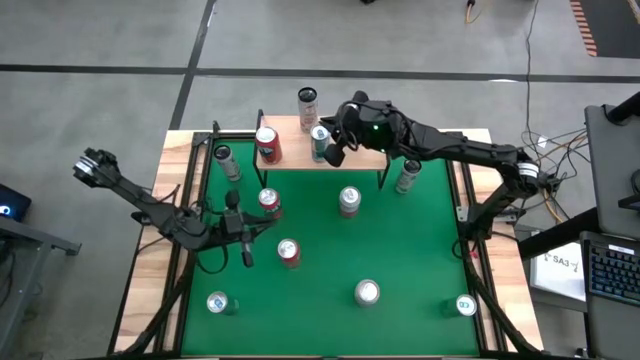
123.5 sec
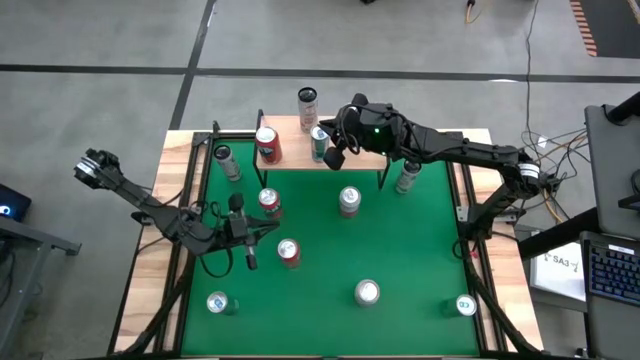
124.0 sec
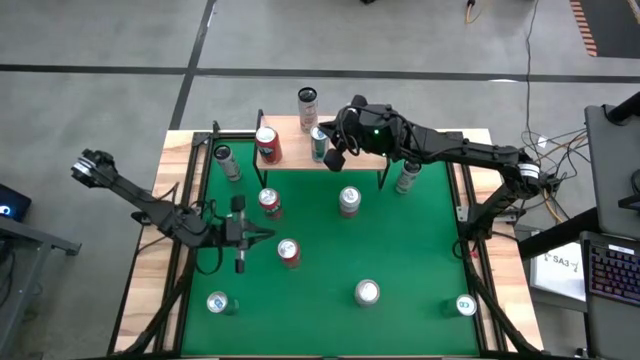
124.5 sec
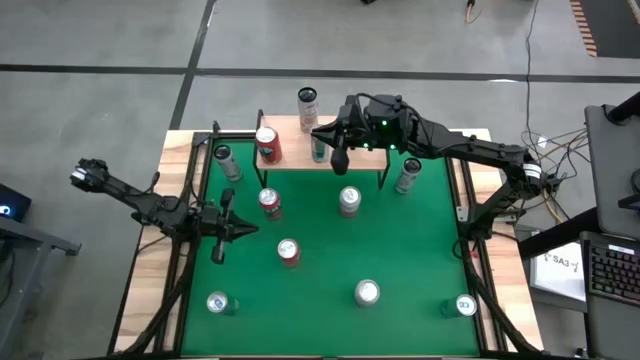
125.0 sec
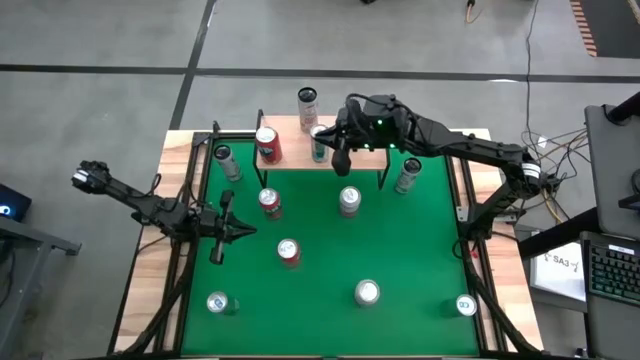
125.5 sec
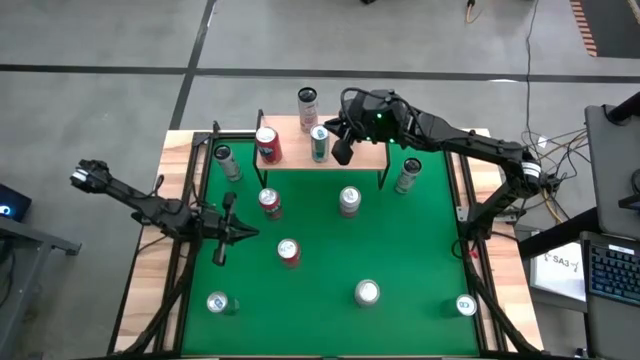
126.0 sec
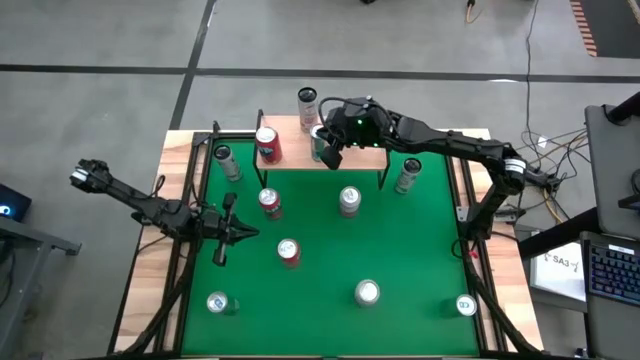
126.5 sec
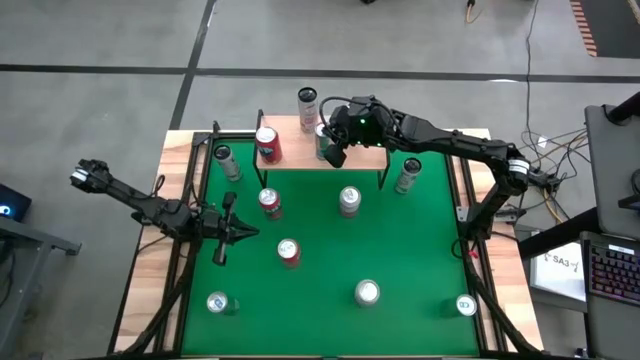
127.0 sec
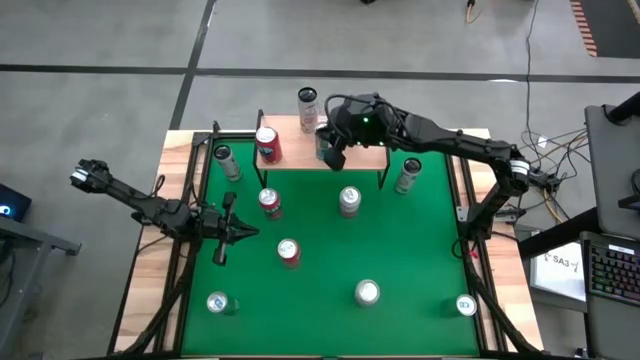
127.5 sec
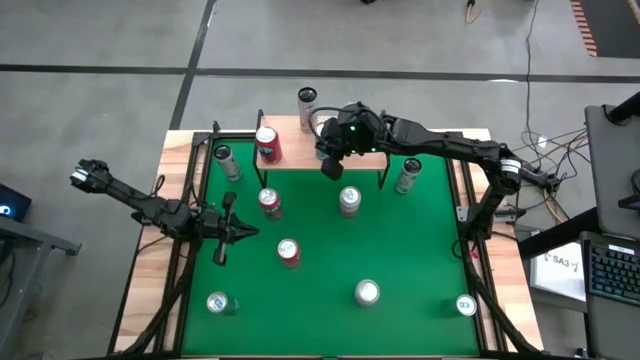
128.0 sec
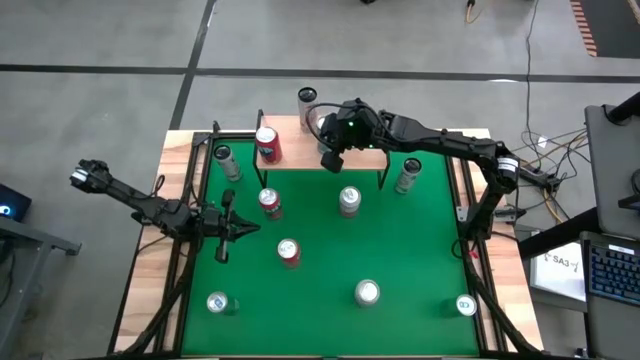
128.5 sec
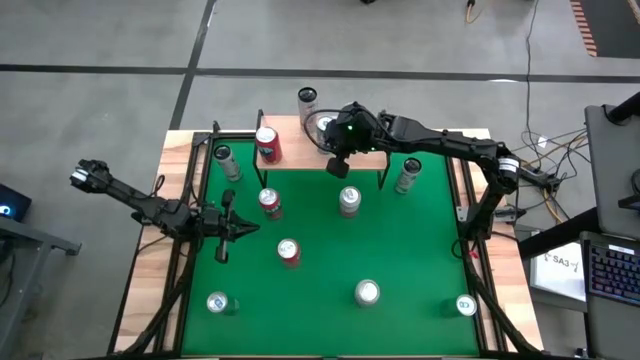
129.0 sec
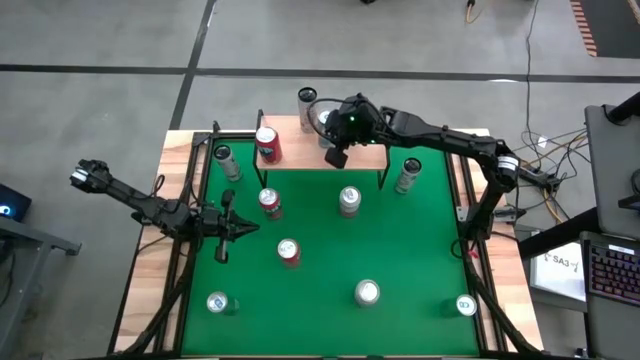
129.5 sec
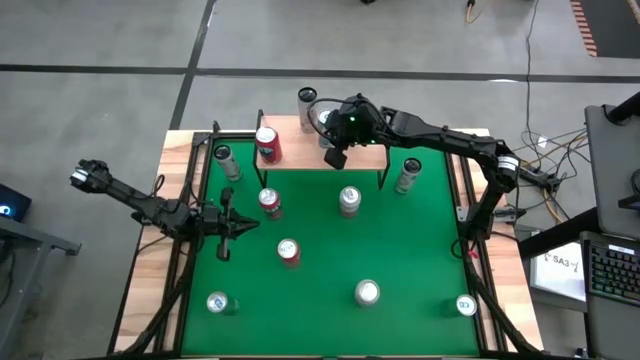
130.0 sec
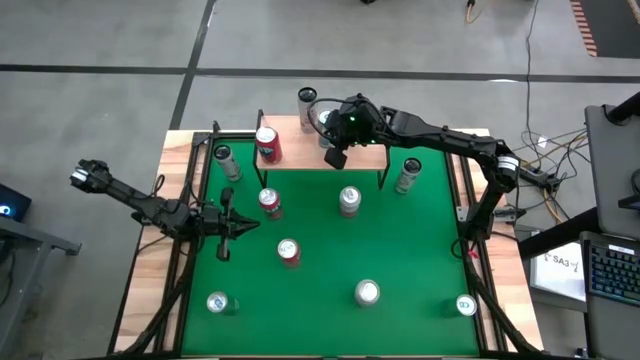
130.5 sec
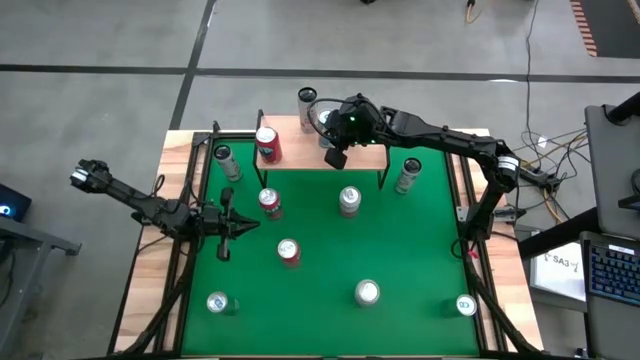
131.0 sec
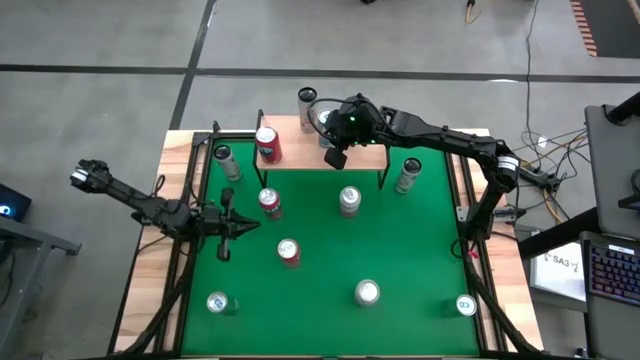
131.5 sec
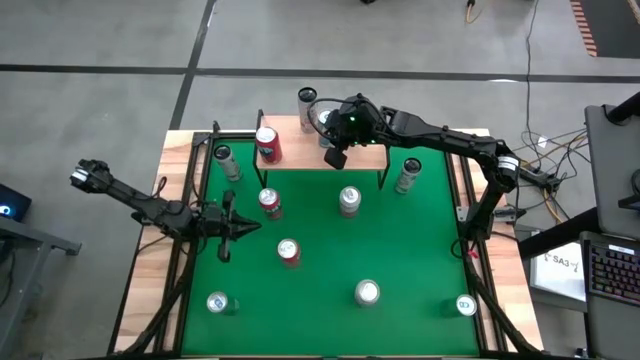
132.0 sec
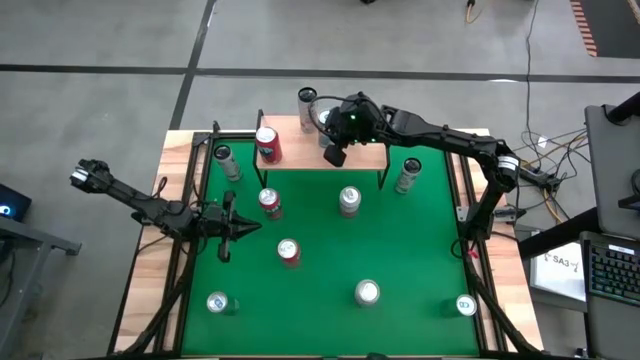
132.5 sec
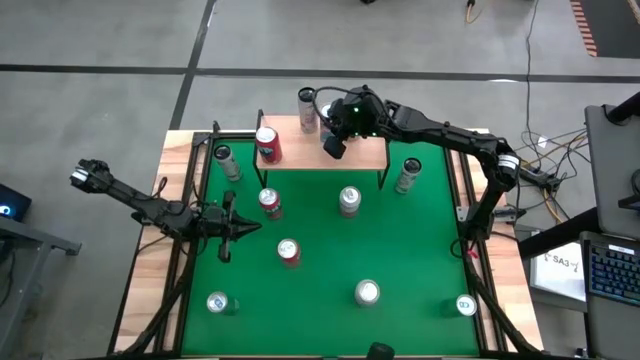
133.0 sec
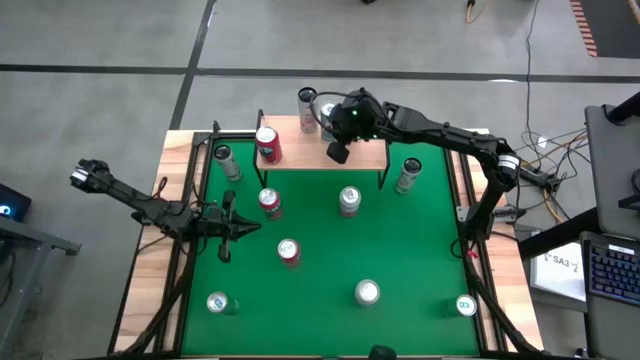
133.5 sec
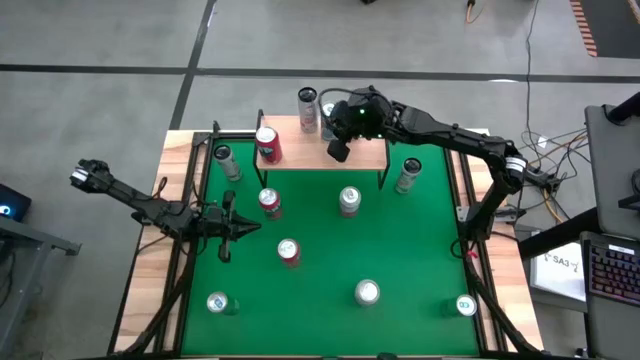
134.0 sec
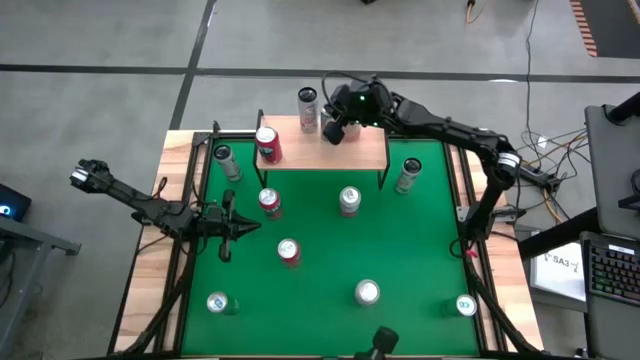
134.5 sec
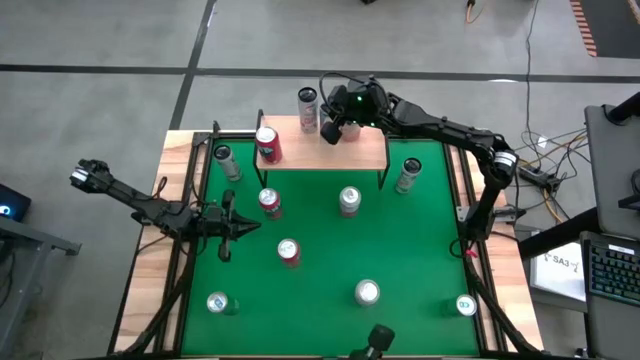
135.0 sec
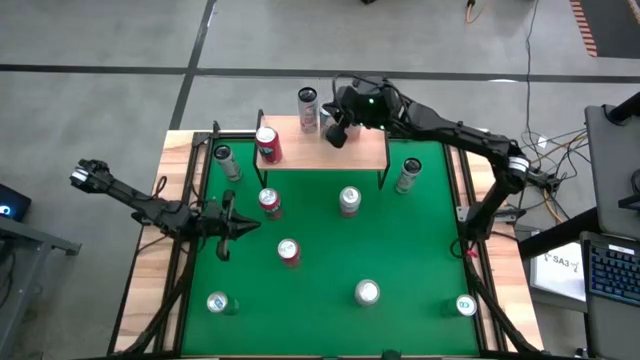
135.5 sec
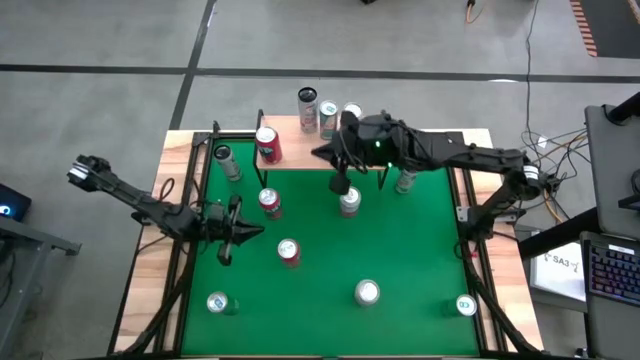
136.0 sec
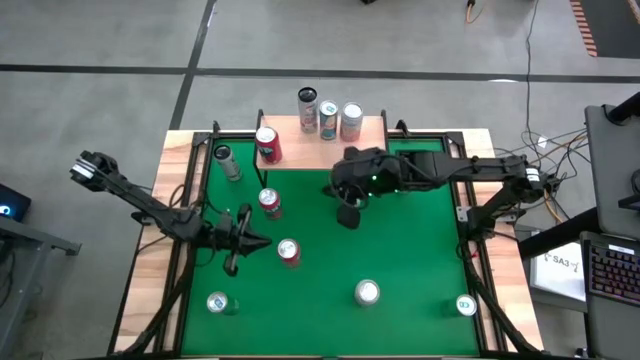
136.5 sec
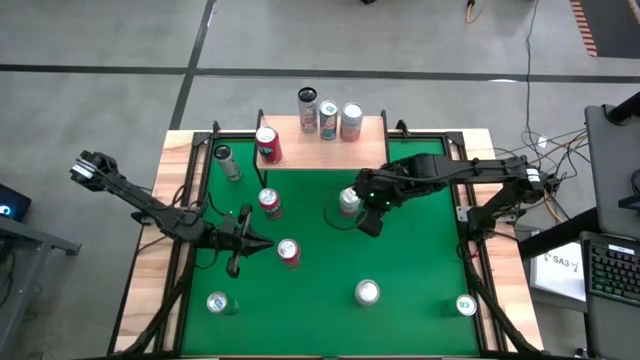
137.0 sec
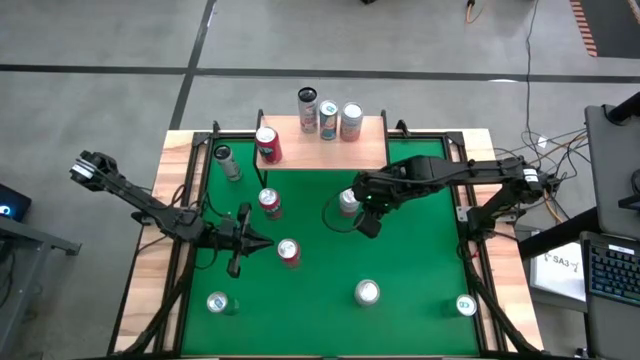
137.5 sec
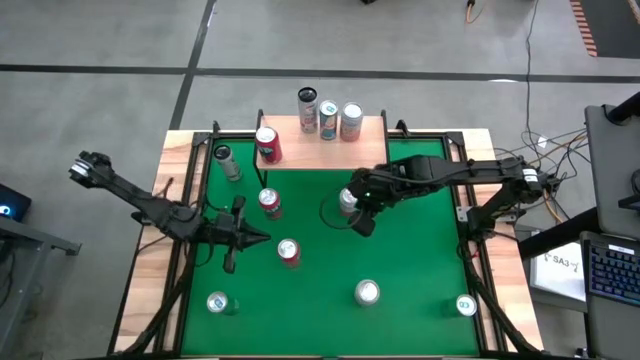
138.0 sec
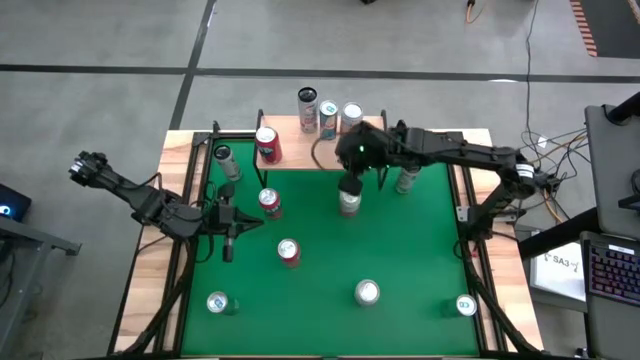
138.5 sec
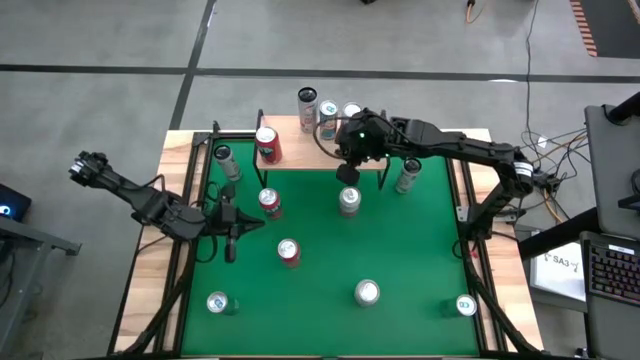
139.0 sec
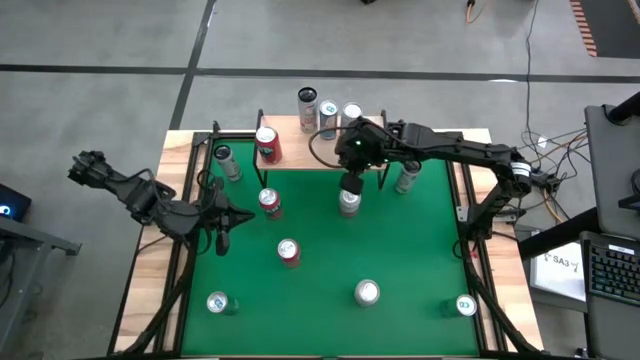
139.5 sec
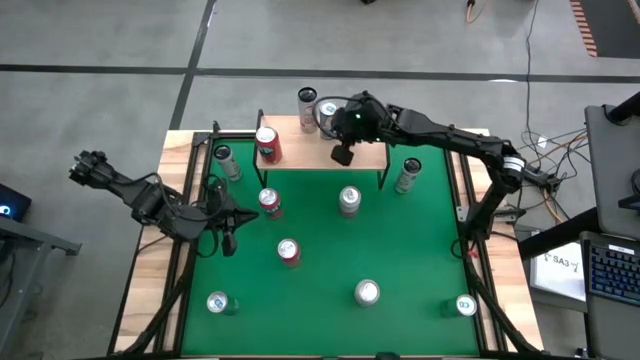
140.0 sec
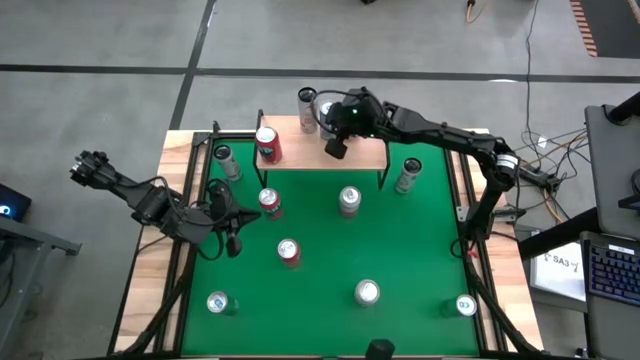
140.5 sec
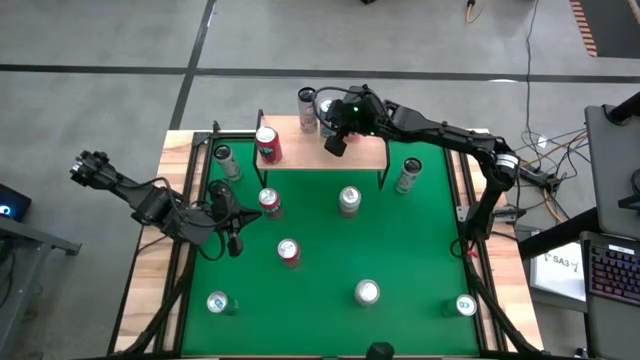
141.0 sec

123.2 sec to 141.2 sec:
Task: Place canned beverage on shelf
Put the top left blue soda can on the shelf

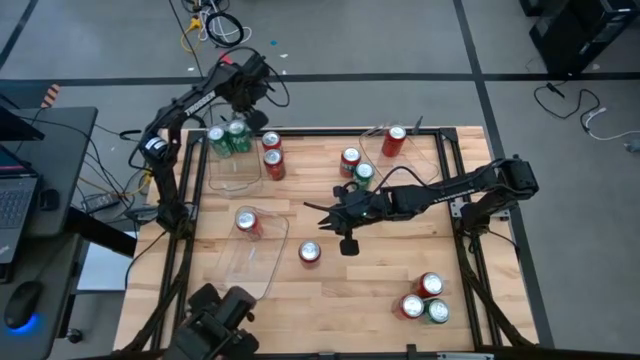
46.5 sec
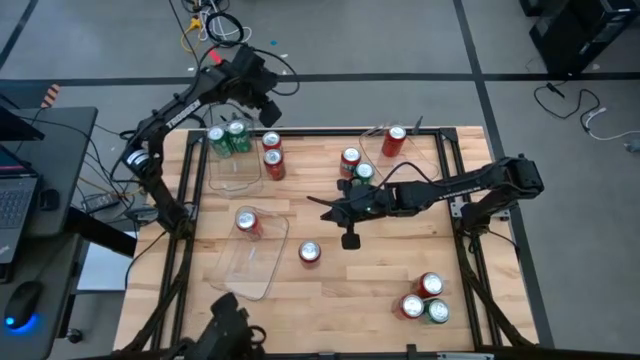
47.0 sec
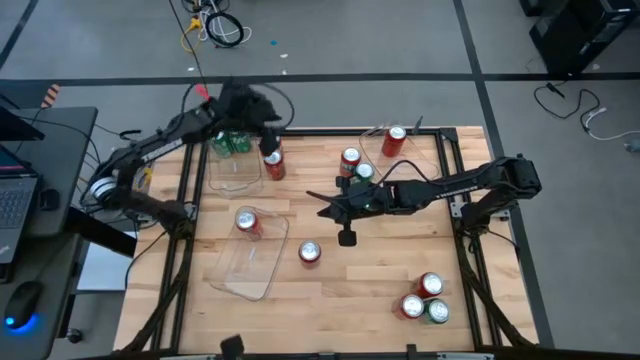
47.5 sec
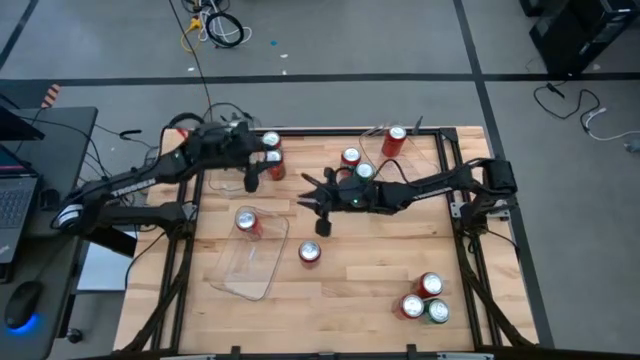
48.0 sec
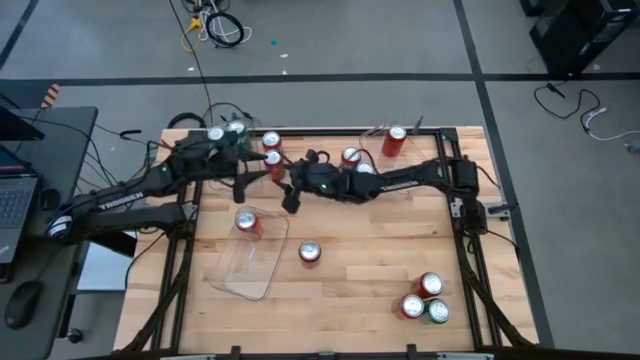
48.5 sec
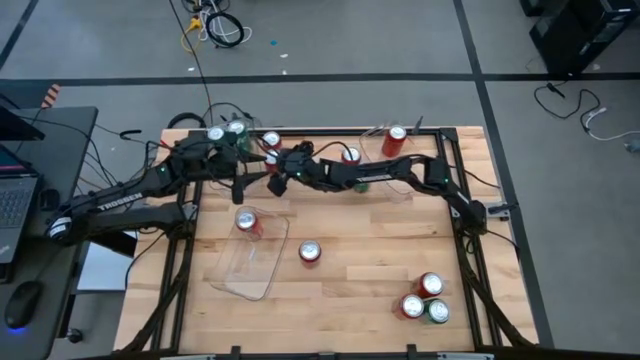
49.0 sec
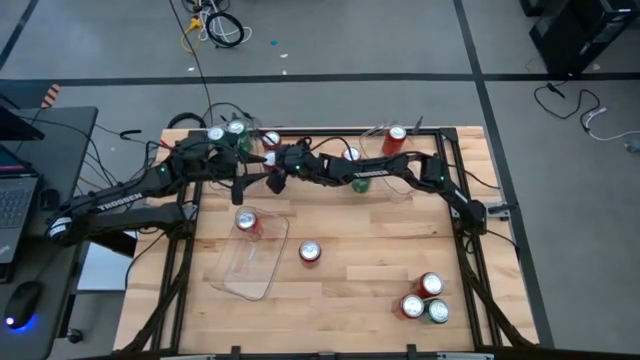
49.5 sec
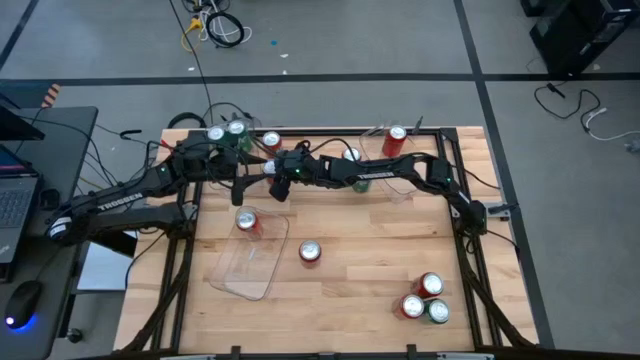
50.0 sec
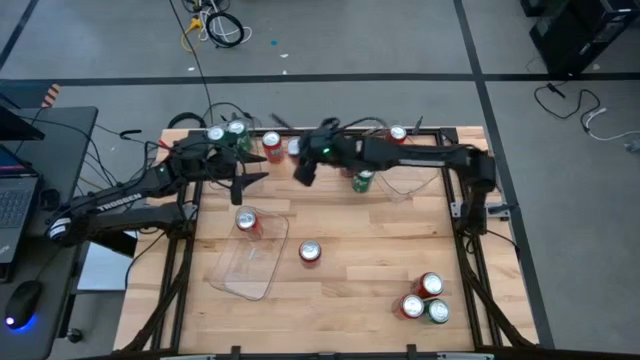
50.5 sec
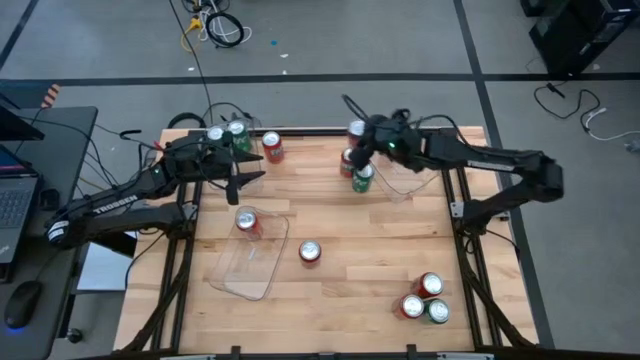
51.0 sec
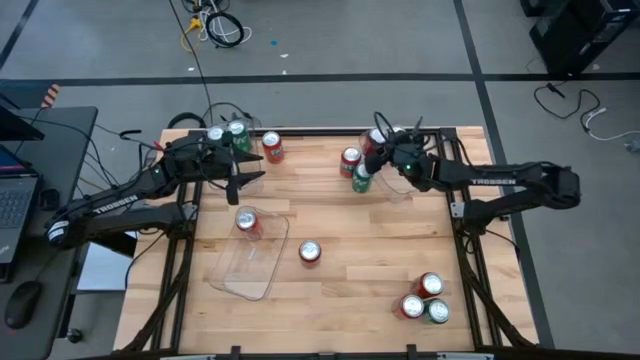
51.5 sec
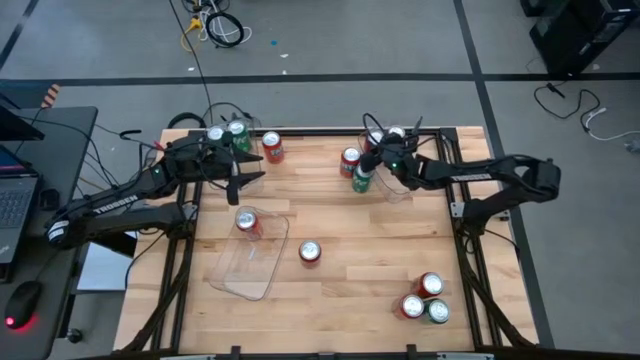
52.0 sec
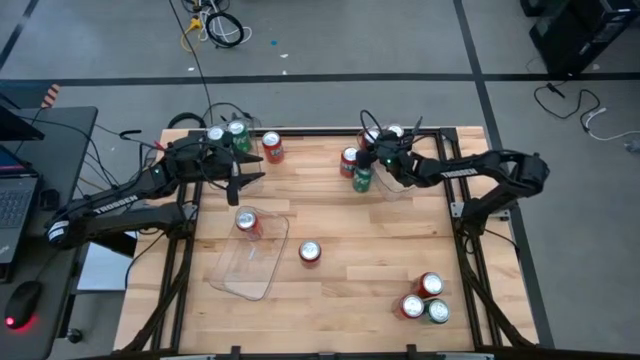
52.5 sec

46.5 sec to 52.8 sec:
Task: Sort soda cans
Put the top red and black soda can into the top right transparent bin
